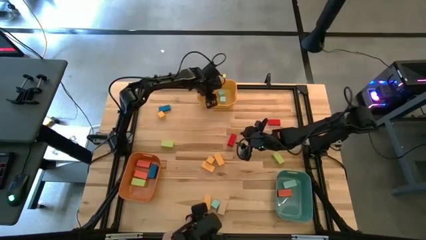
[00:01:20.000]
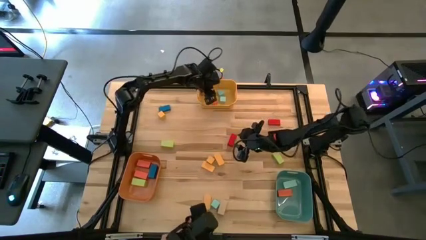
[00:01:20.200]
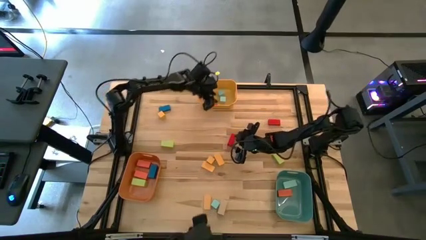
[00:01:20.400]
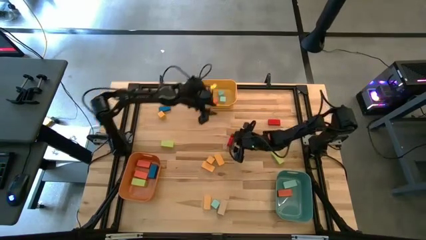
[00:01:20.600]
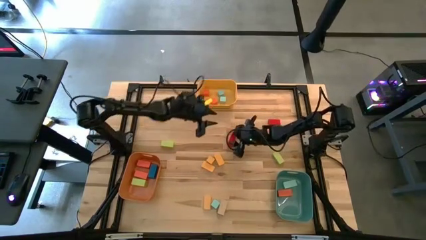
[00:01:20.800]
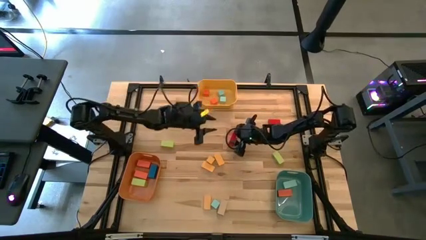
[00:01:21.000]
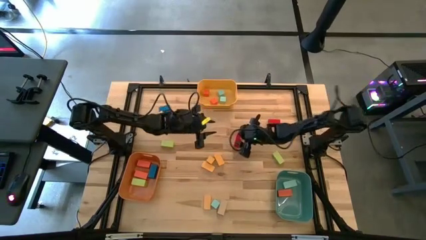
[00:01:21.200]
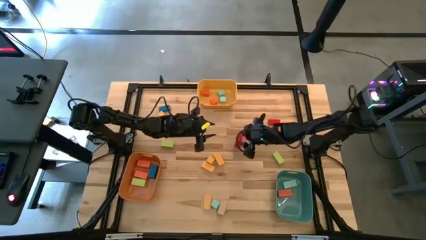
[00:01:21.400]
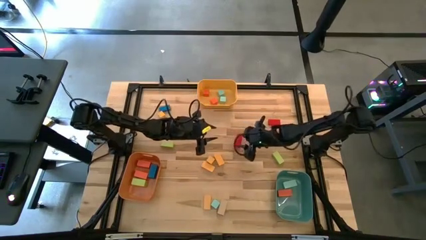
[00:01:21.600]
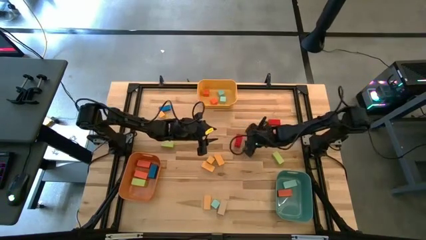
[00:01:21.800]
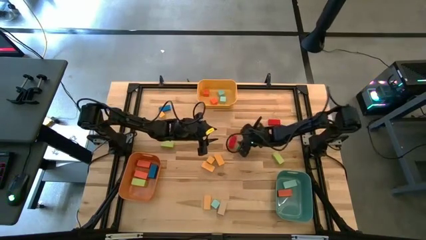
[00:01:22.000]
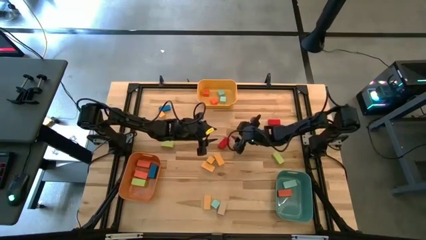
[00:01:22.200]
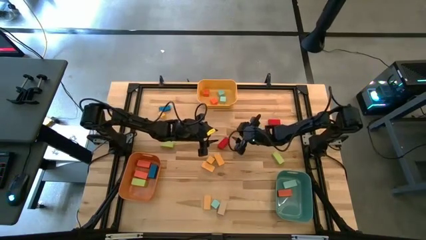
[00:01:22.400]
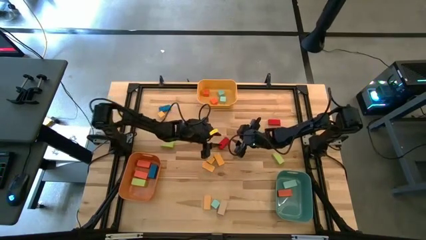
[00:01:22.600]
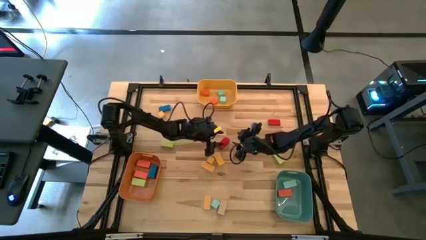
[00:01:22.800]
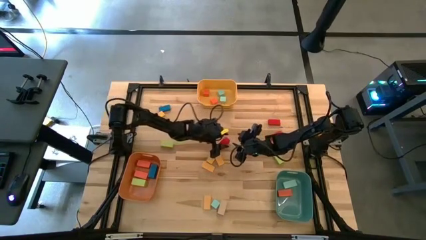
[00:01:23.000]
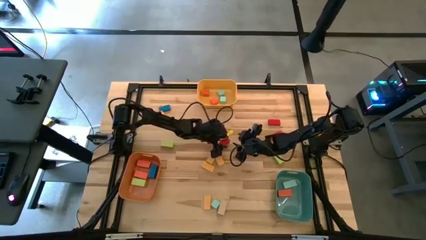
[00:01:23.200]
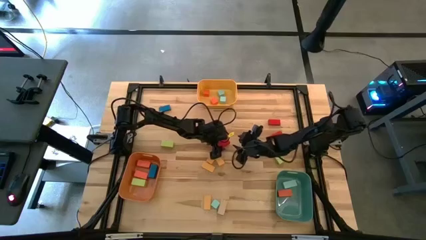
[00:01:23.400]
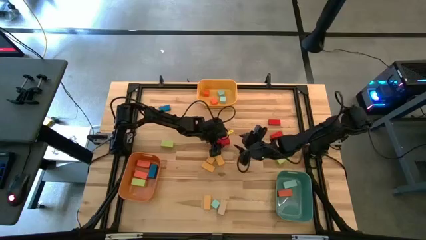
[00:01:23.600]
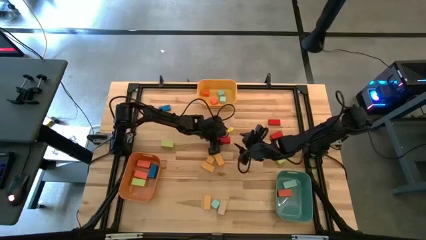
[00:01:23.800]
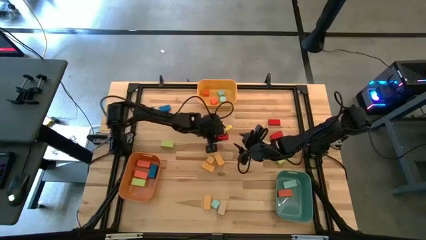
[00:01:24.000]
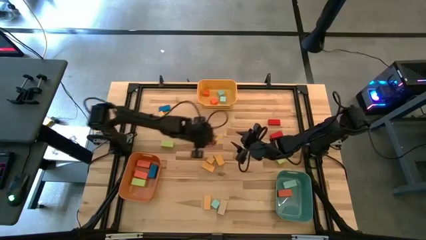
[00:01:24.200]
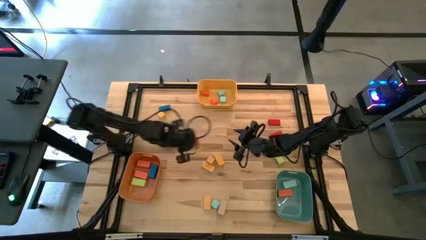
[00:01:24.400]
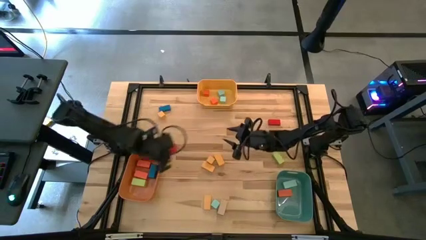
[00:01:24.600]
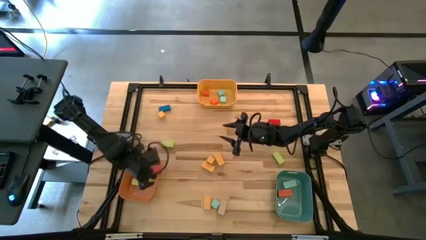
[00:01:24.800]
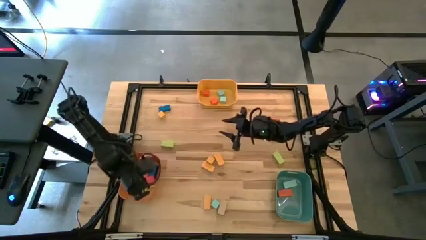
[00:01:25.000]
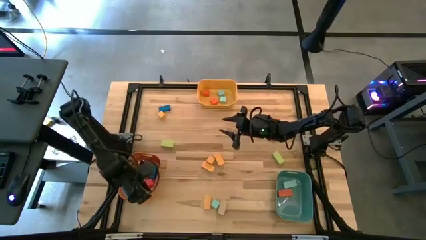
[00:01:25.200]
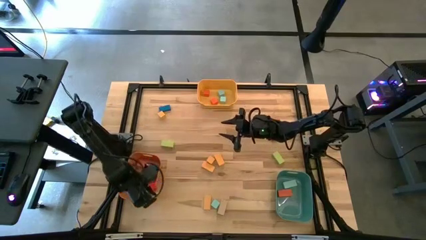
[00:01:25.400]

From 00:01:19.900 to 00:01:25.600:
Task: Sort blocks by size
Put the thick red block into the orange bin

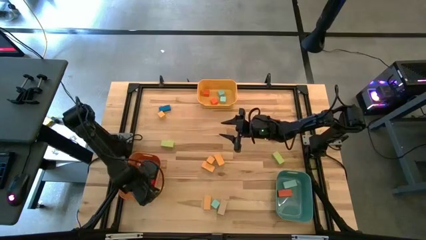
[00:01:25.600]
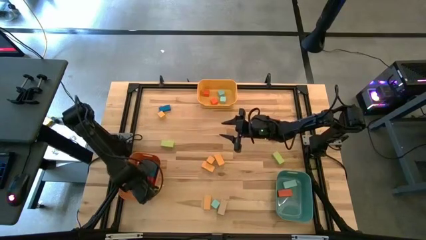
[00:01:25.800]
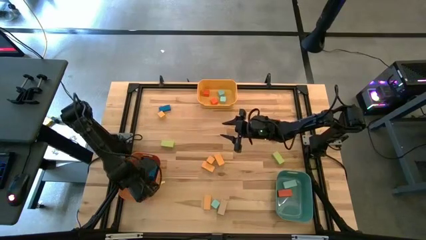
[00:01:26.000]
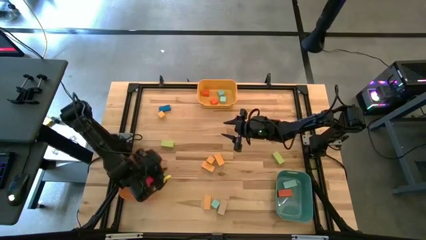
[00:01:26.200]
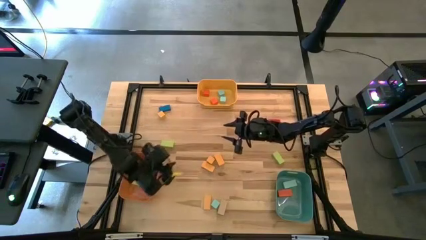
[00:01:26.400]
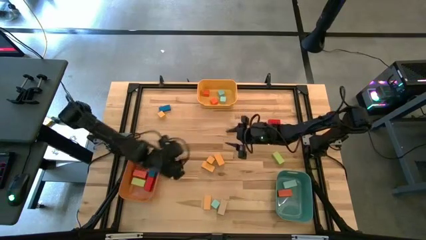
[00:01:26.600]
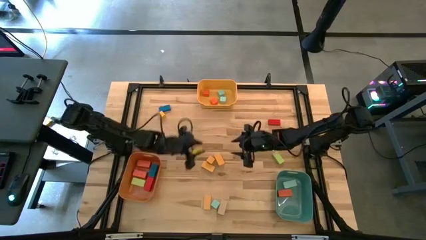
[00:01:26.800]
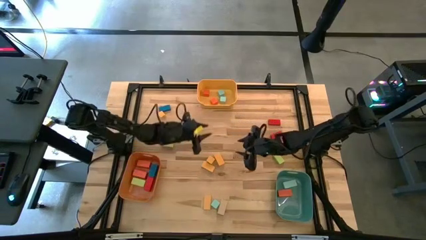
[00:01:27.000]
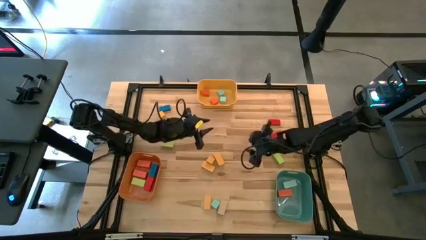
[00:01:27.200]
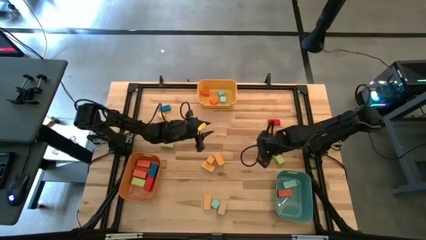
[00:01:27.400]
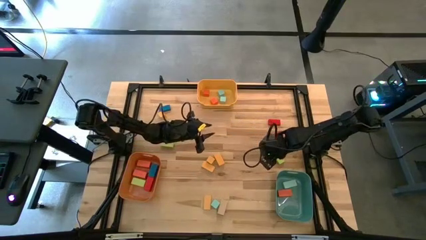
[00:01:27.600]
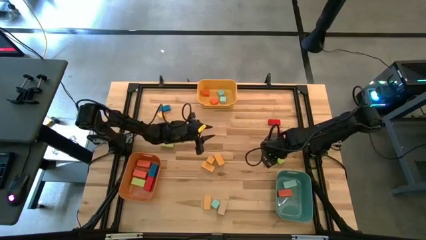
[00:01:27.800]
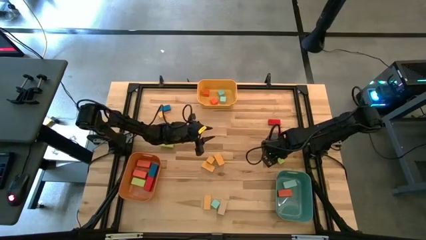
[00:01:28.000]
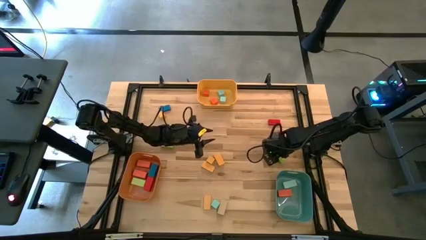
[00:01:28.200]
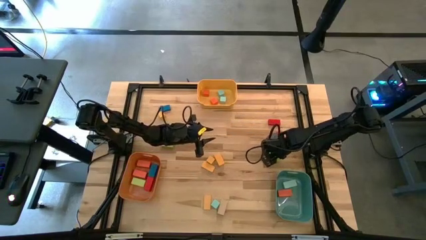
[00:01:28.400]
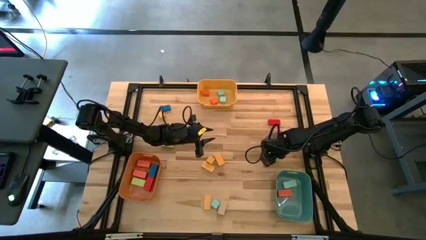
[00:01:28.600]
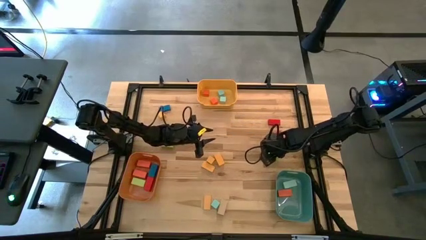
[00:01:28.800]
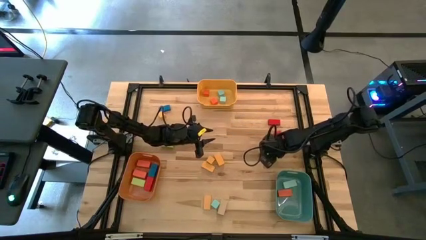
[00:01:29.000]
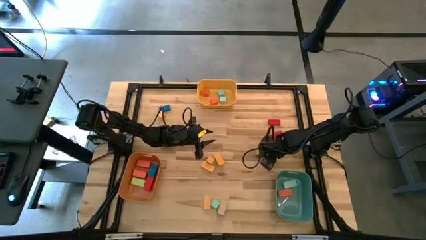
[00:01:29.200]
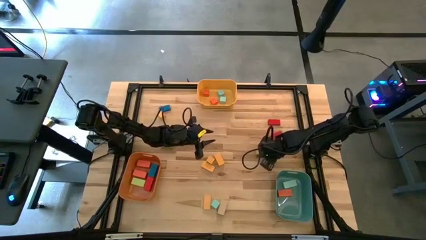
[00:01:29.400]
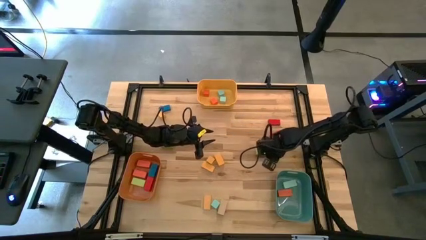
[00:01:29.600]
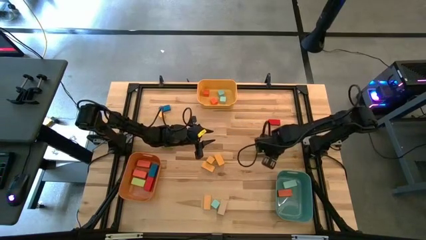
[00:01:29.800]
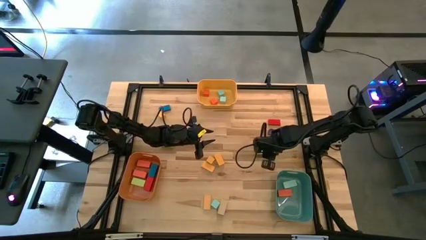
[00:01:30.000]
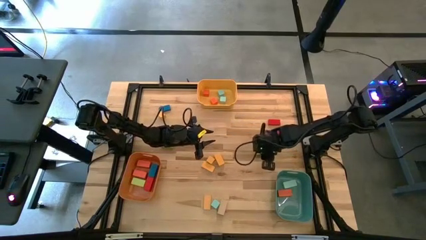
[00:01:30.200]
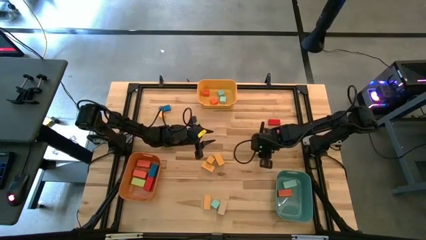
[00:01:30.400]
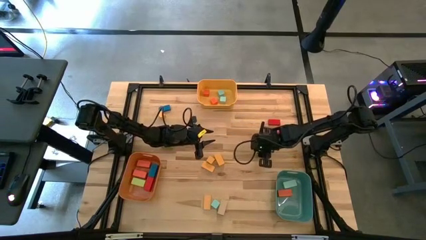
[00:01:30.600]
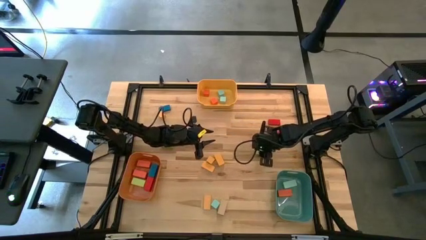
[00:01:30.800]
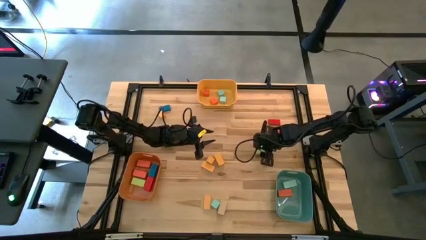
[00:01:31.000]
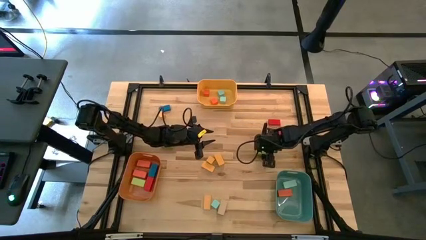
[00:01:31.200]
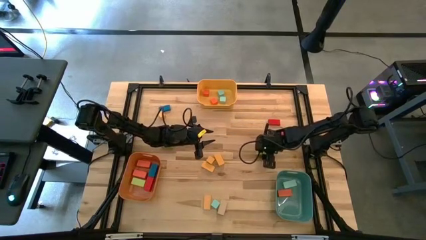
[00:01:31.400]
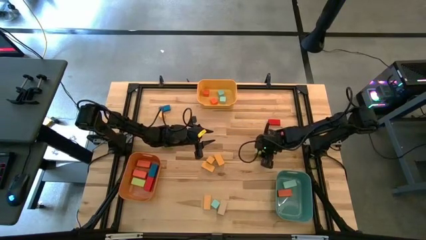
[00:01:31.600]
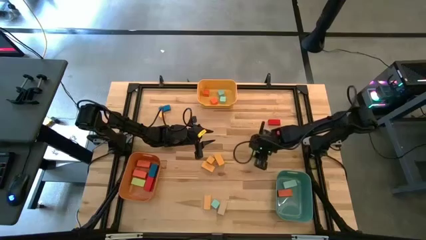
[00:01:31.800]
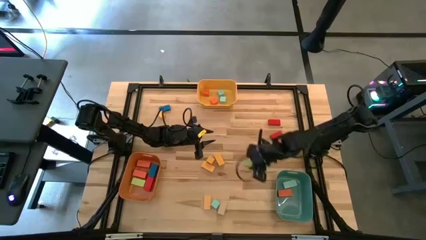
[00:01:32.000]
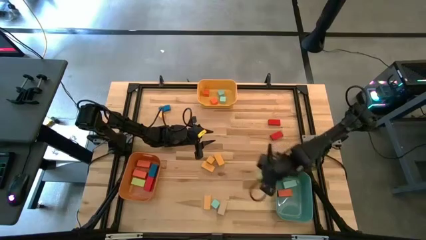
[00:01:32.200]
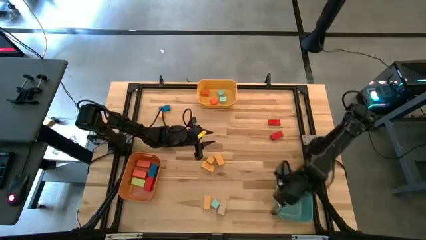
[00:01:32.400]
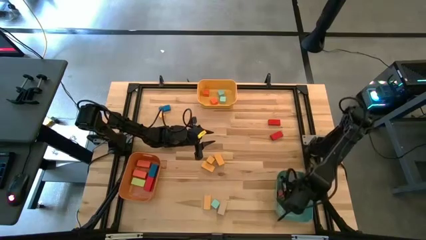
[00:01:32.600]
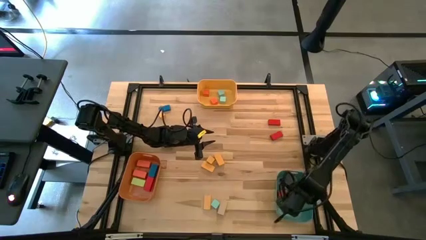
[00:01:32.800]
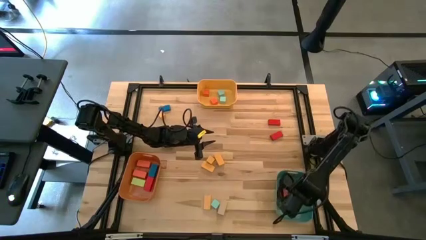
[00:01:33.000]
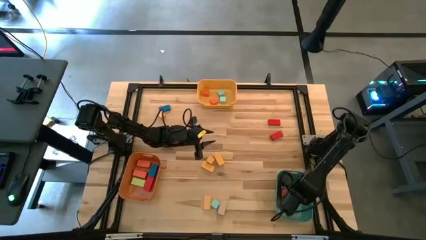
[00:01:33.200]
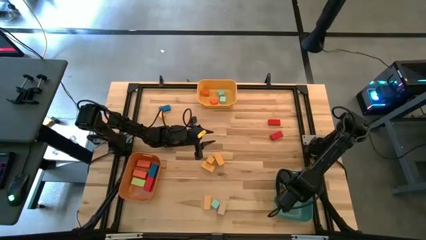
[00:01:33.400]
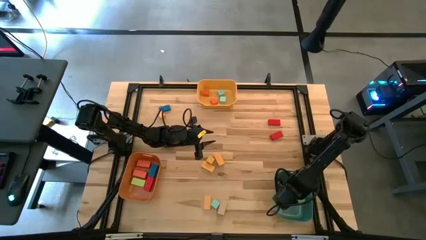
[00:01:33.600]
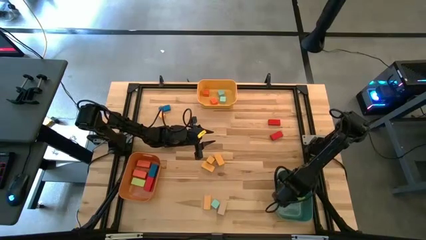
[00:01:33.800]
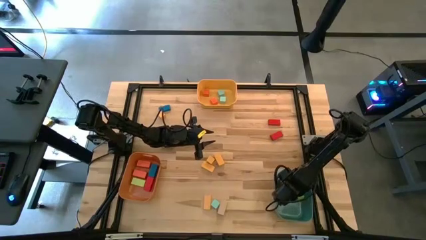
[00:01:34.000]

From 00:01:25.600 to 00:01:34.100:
Put the thin light green block into the green bin

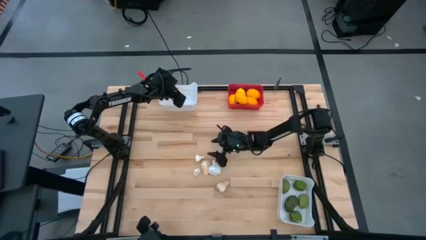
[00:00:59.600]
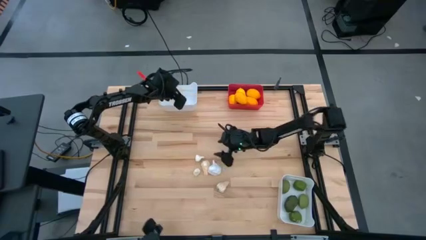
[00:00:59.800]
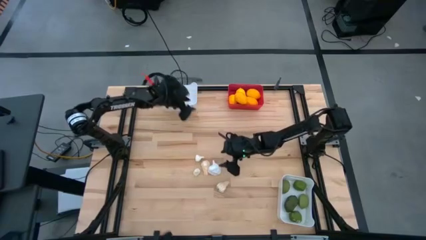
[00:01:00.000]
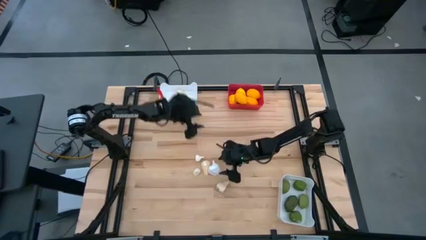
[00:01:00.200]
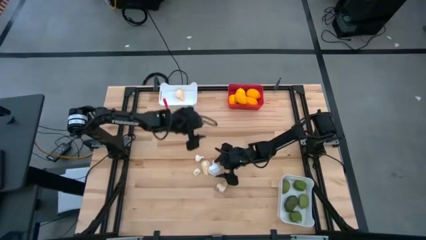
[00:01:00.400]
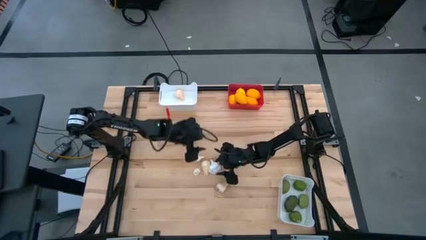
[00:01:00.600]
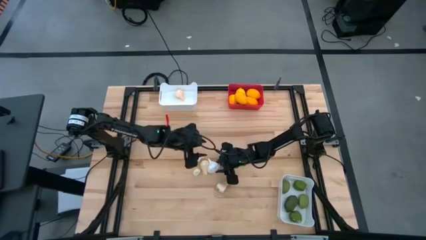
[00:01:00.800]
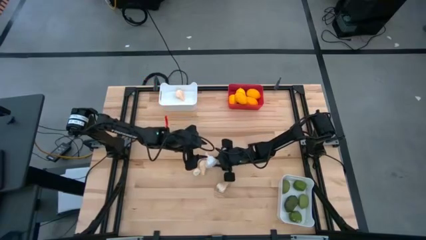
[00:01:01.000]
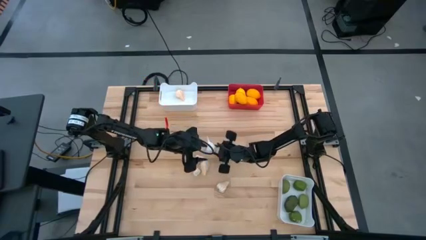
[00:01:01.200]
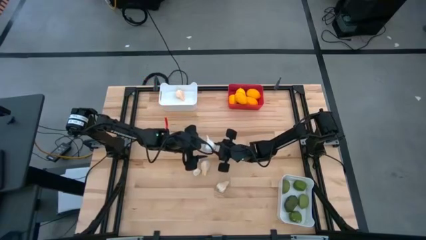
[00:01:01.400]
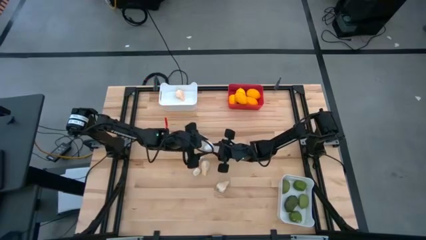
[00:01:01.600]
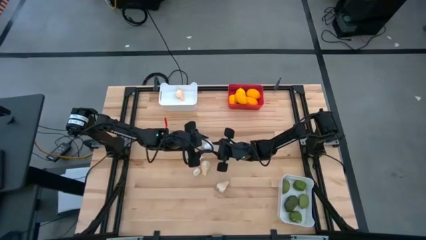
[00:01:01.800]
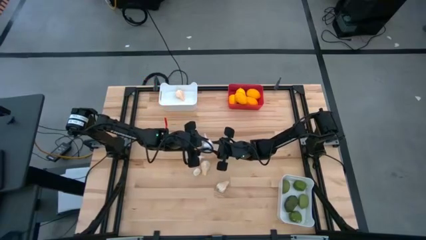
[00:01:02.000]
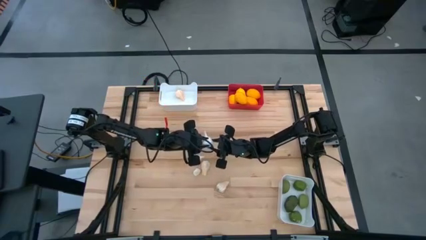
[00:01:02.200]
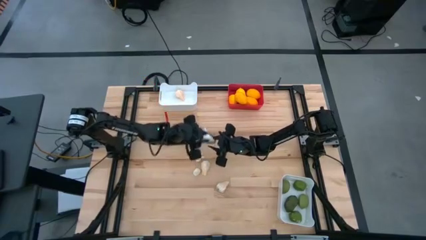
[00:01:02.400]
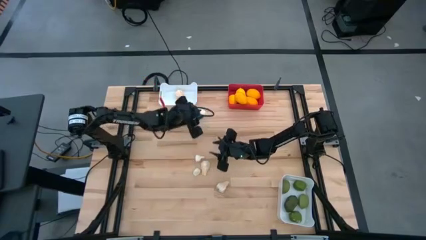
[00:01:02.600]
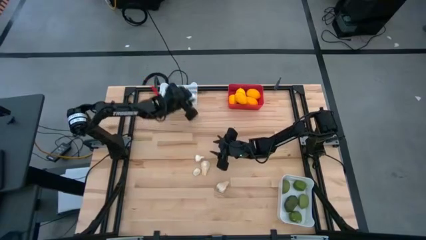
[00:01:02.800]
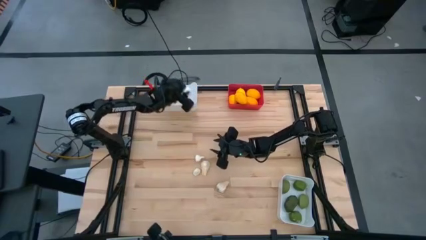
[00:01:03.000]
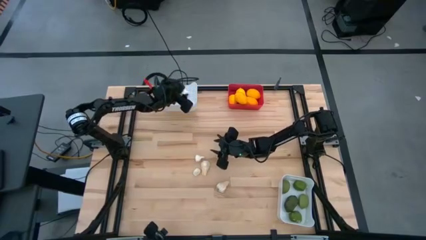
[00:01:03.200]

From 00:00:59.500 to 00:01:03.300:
Task: Sort produce into baskets
Put the white garlic into the top white bin
